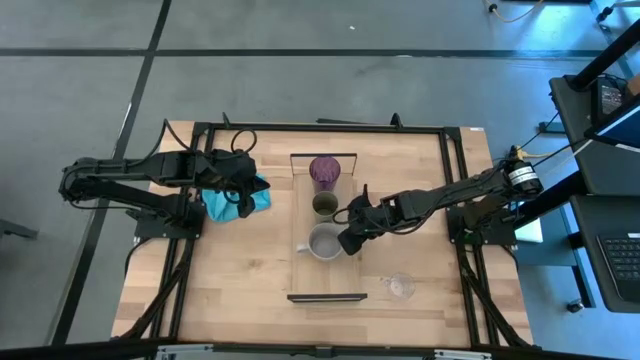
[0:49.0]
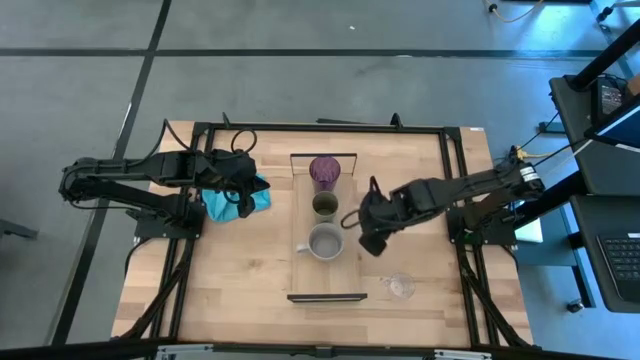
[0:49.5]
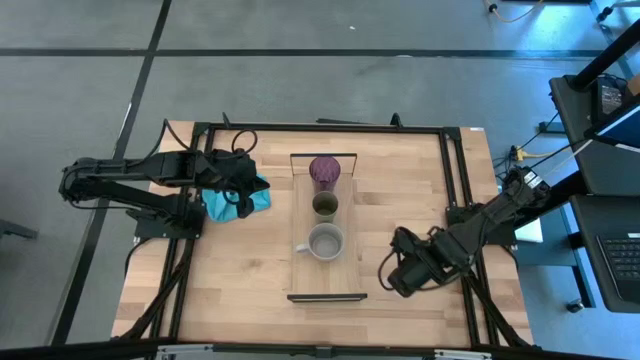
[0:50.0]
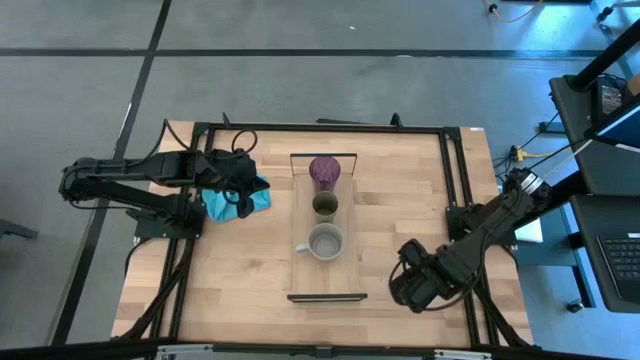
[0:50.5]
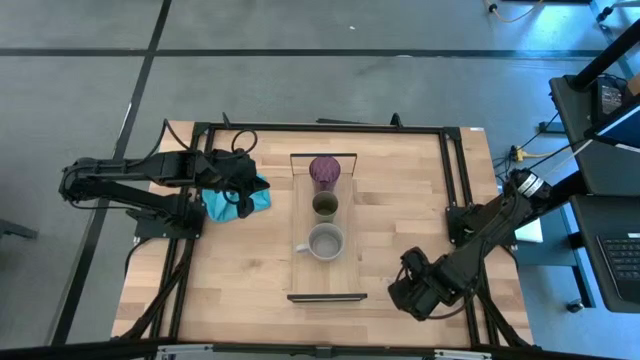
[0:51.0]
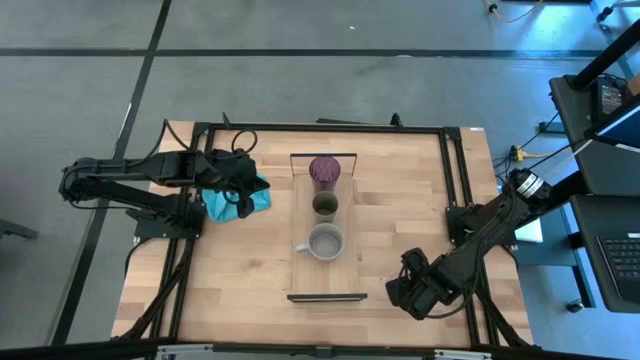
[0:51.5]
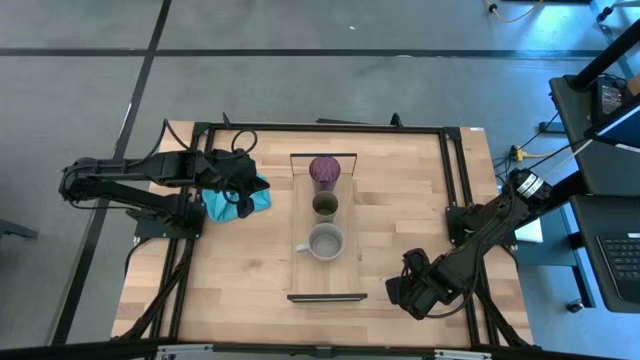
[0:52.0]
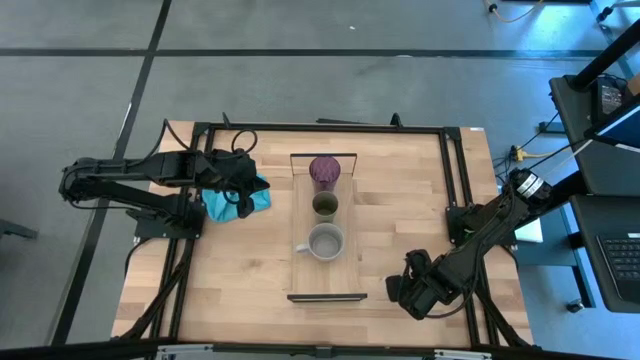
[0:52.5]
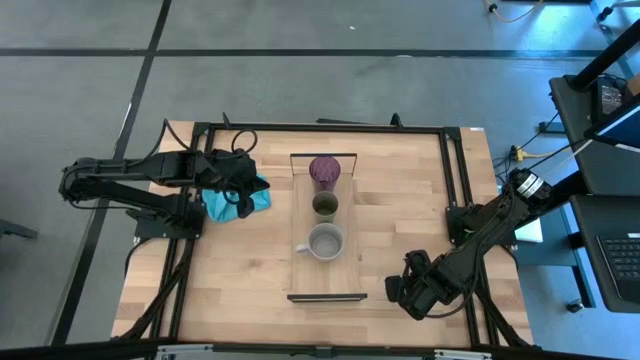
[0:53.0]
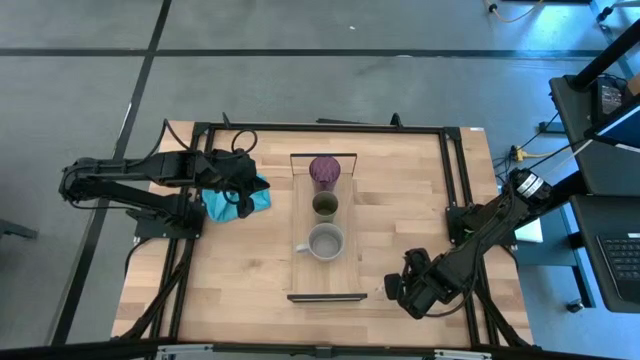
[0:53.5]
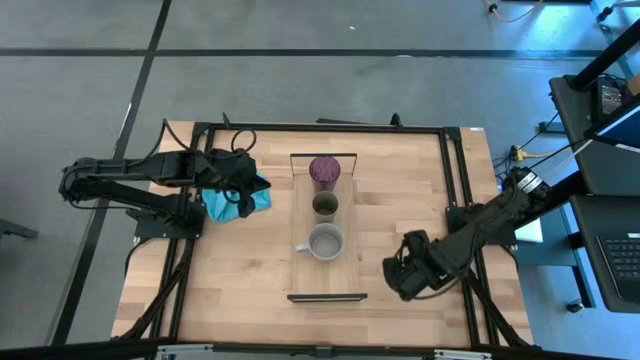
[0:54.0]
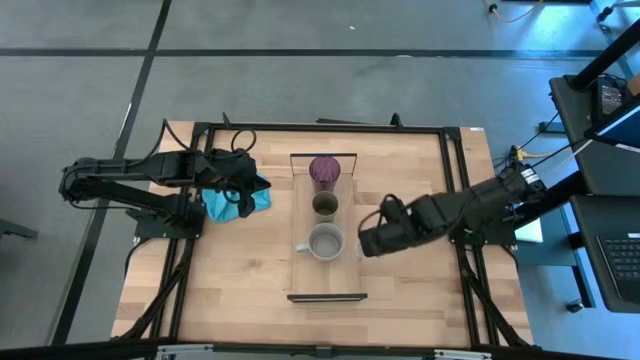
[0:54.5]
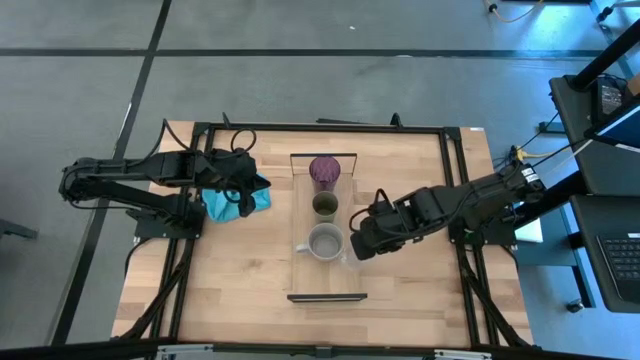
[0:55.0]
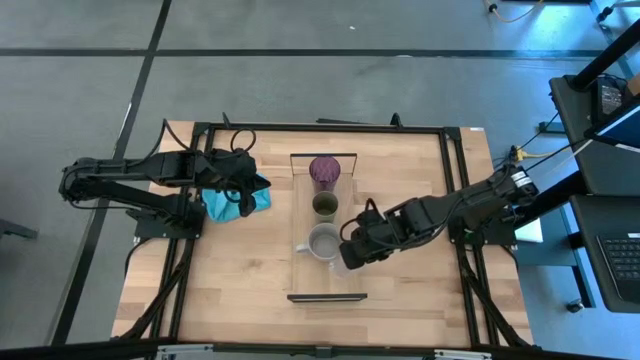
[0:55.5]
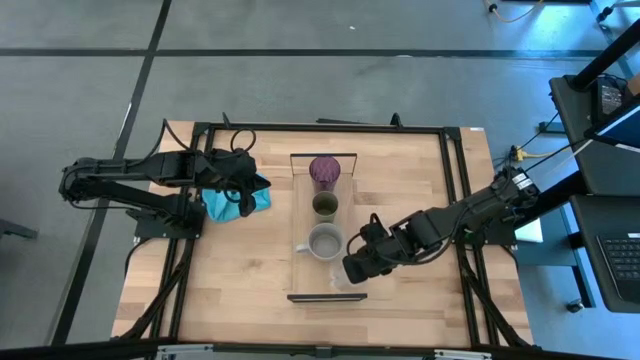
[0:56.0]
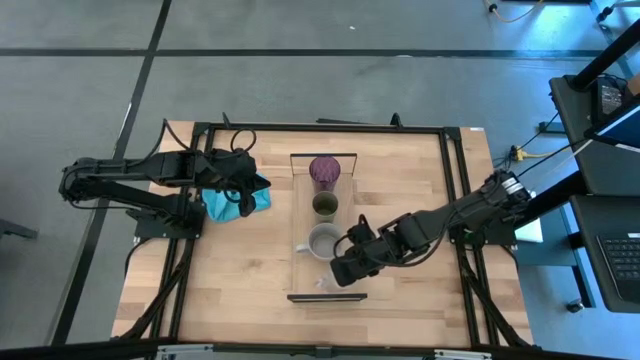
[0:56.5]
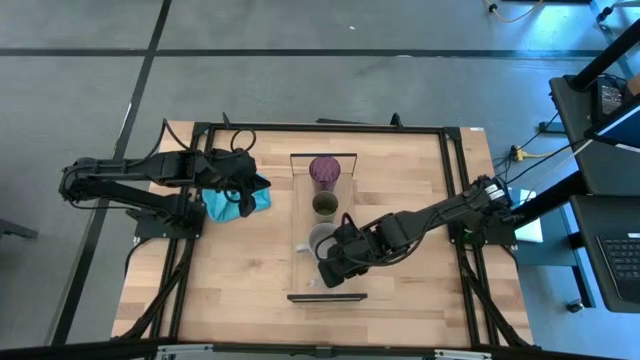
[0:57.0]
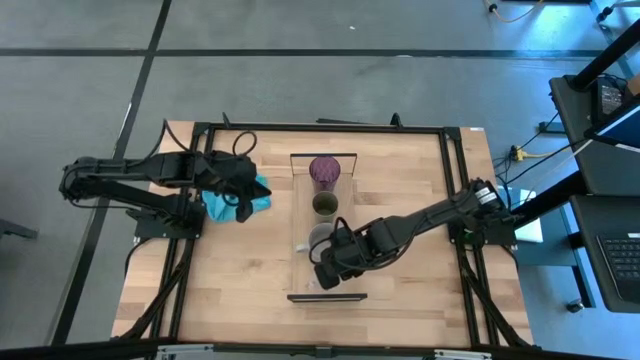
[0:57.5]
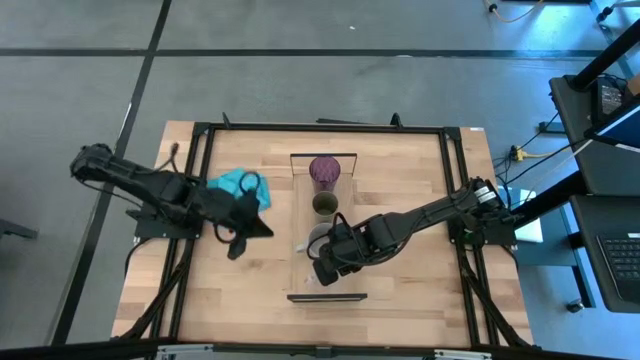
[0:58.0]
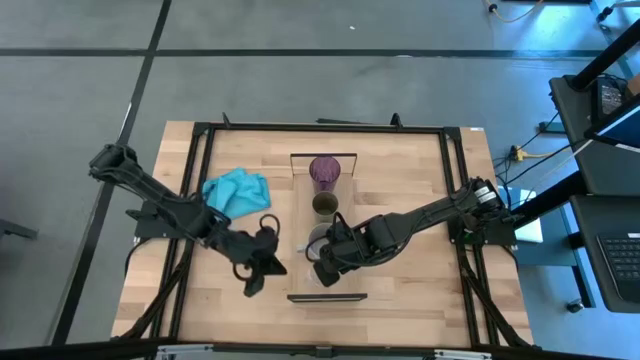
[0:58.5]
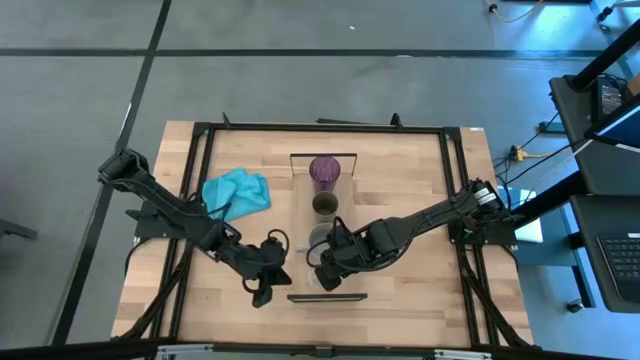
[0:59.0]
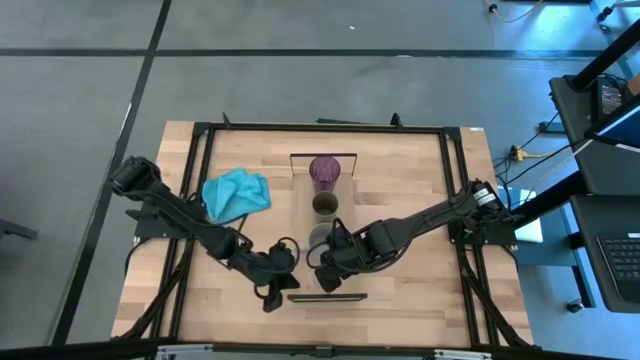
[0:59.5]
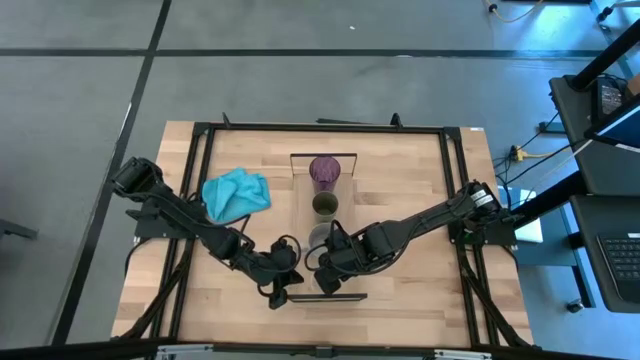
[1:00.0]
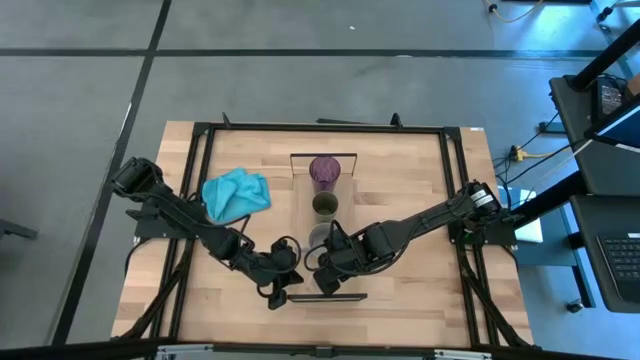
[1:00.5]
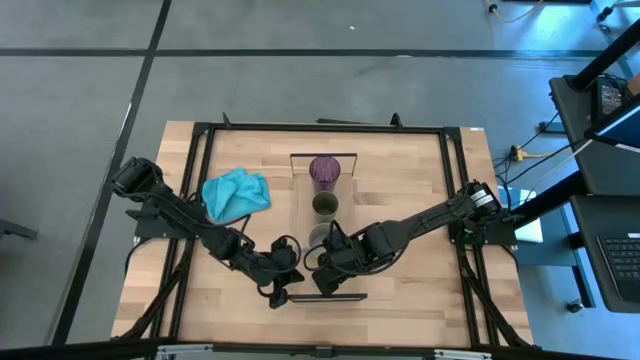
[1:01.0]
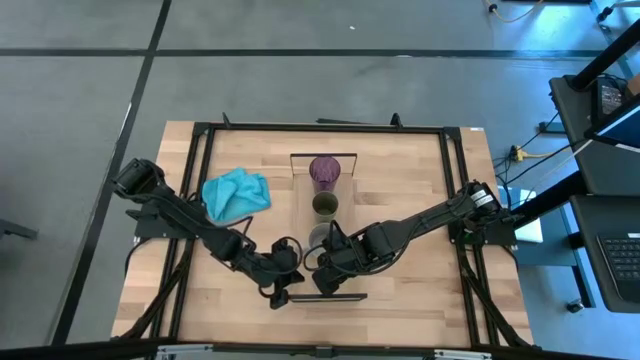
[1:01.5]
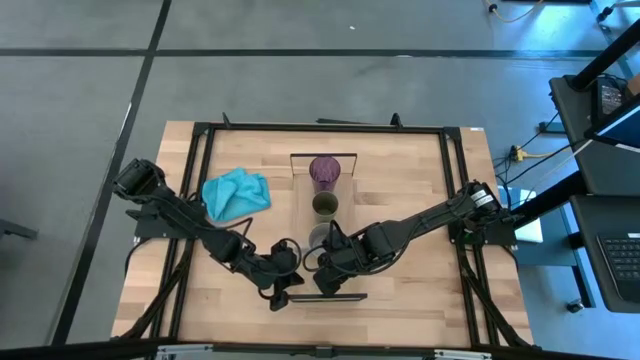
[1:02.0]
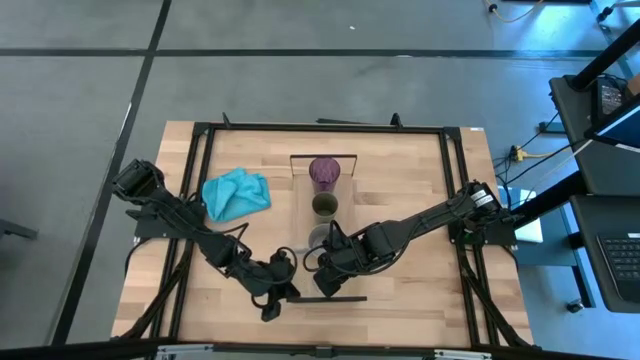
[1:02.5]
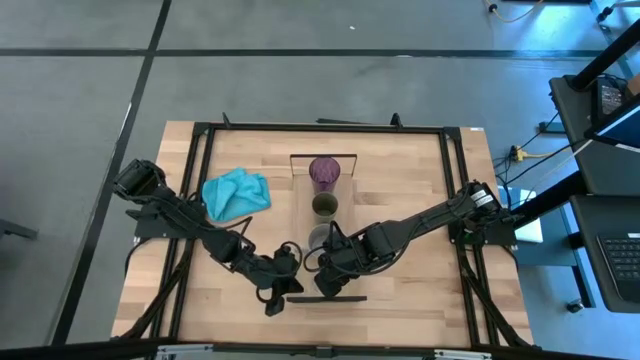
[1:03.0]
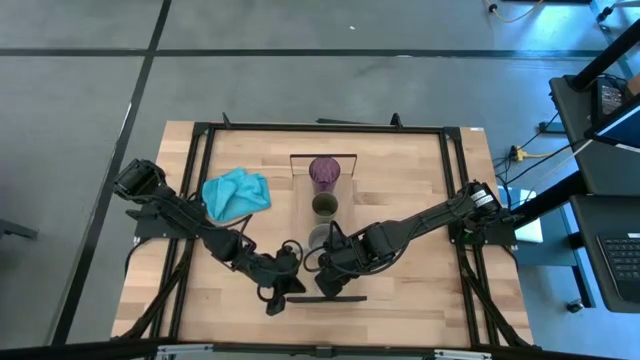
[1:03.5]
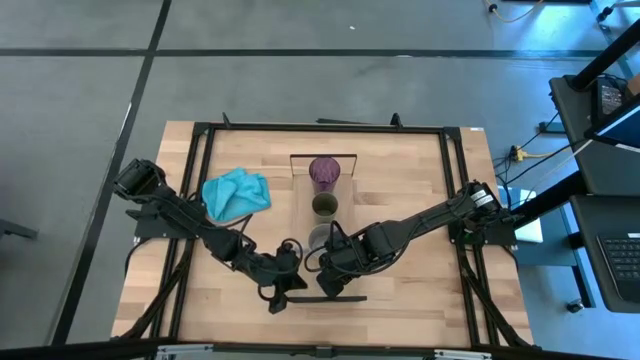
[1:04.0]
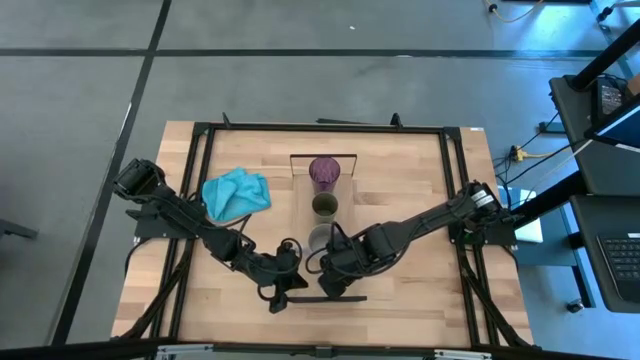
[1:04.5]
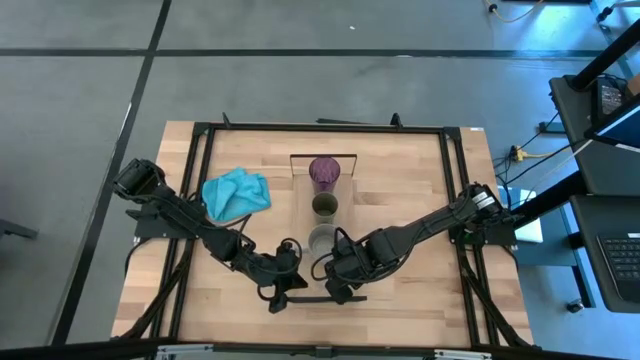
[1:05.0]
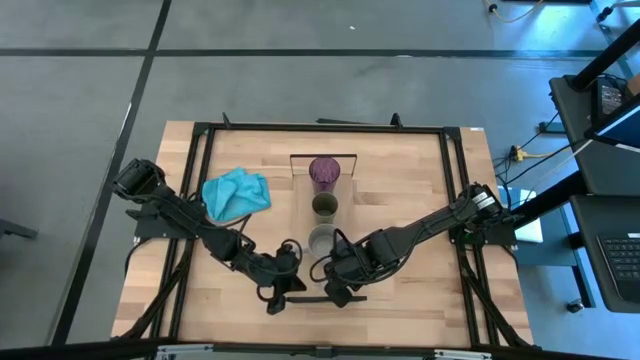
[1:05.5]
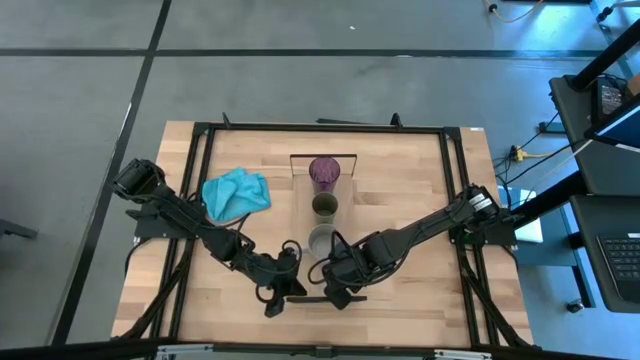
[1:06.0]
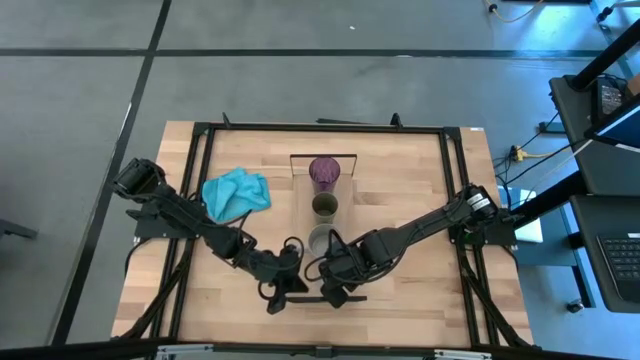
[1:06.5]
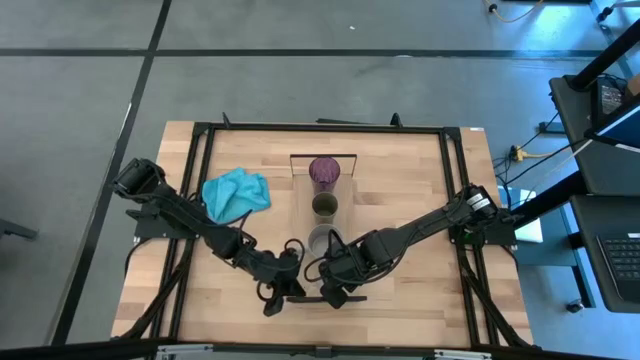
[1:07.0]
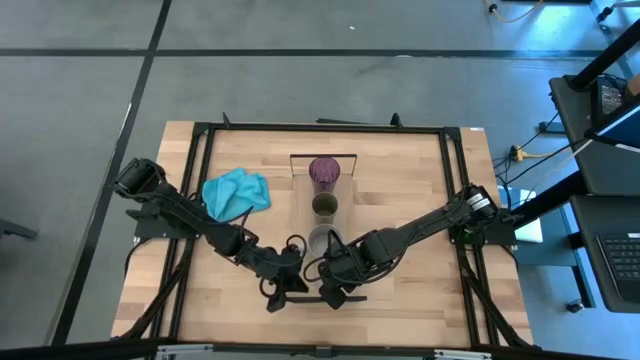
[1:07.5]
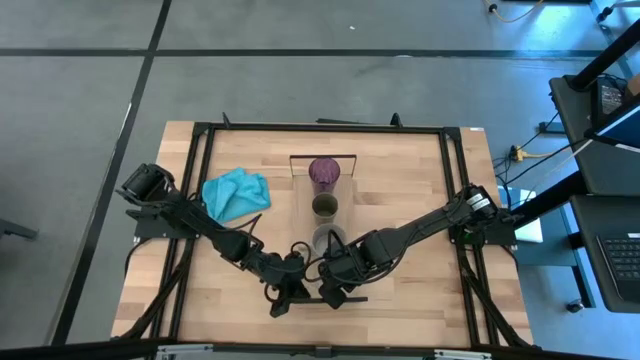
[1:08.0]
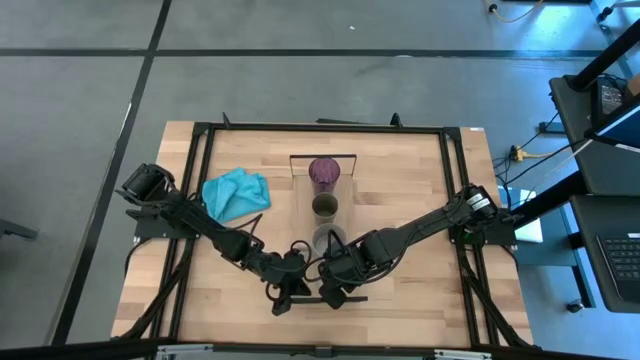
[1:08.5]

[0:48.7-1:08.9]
Task: Stack small to large cups/mugs on shelf
Put the transparent mug on the shelf

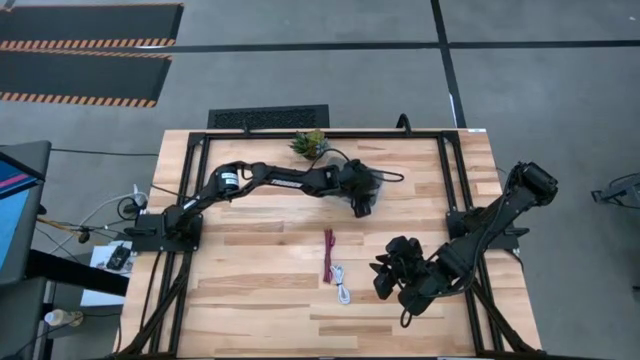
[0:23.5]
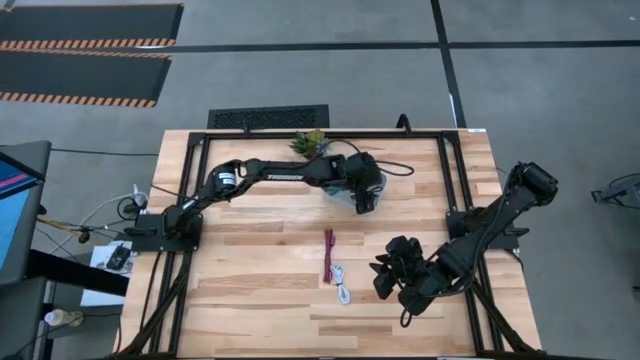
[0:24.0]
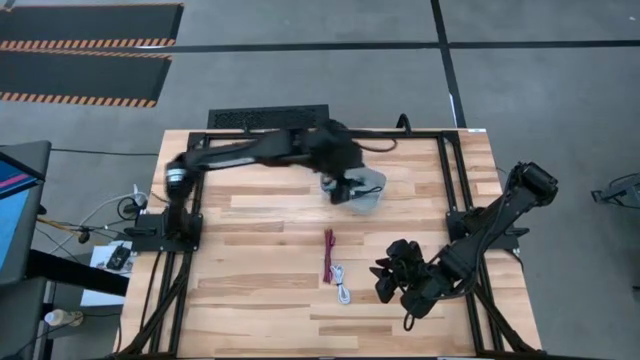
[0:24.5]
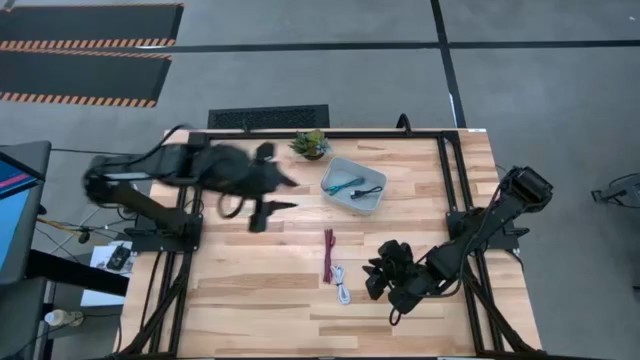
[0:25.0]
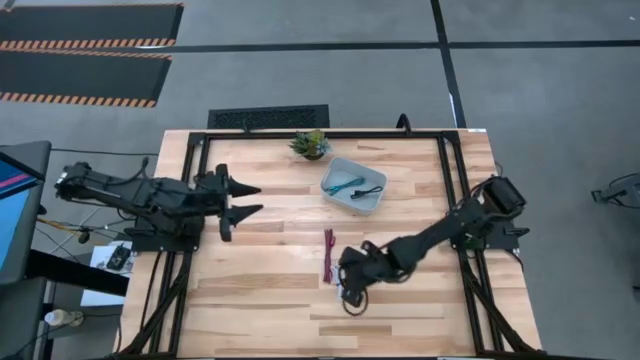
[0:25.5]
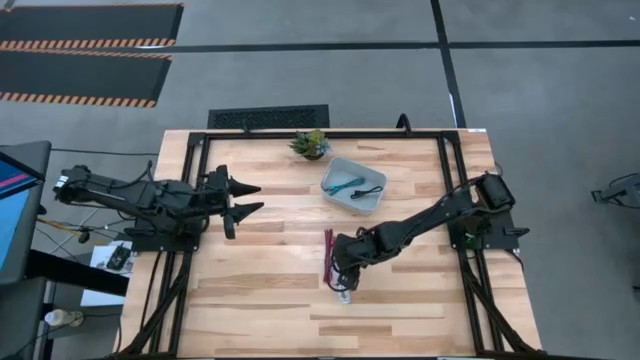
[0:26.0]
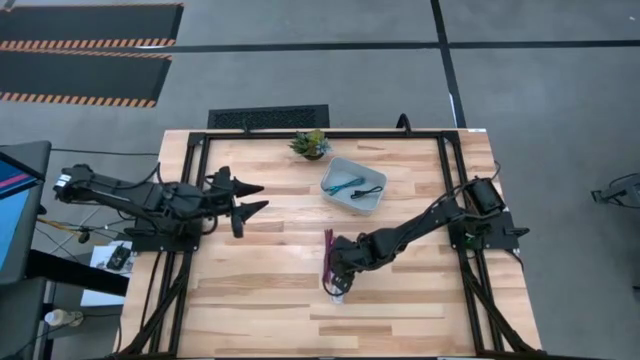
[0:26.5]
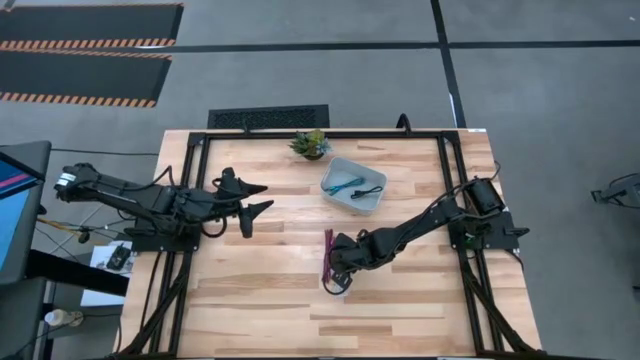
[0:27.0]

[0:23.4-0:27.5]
Task: Pick and place USB-C Cables
Put the white charger cable into the white bin
